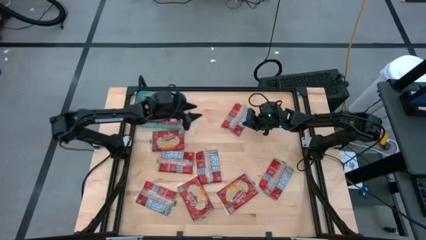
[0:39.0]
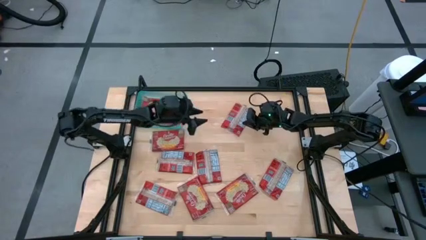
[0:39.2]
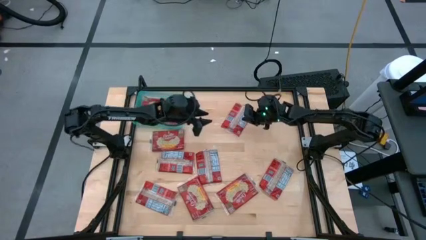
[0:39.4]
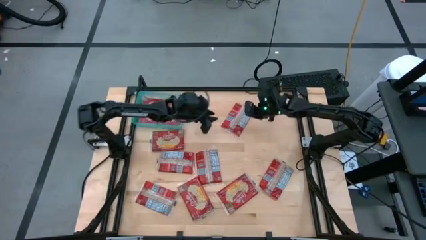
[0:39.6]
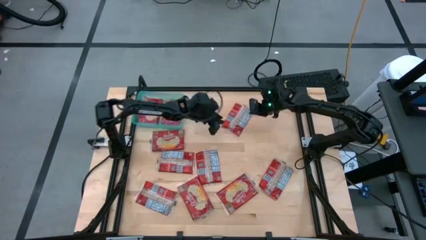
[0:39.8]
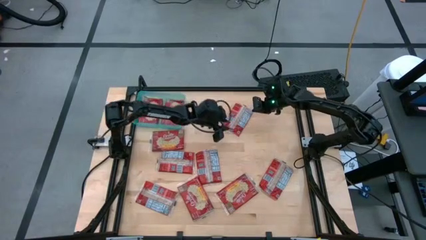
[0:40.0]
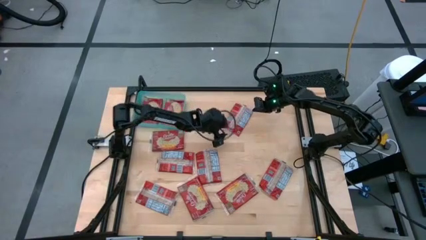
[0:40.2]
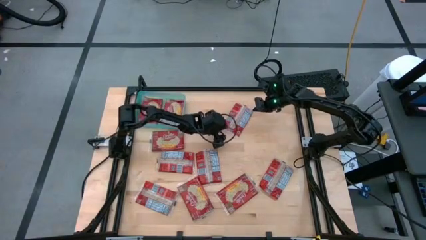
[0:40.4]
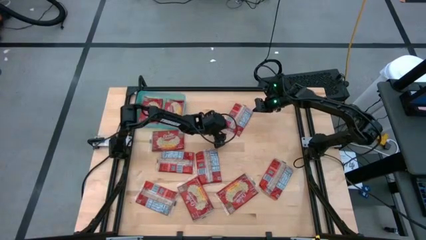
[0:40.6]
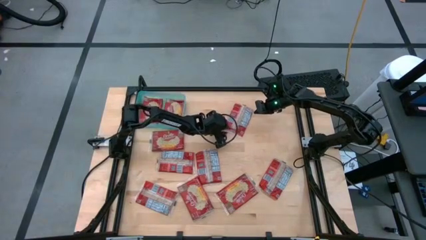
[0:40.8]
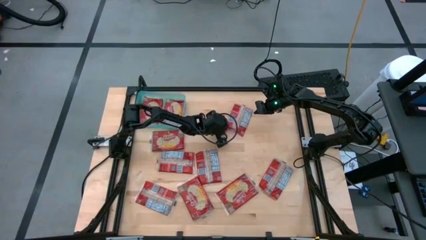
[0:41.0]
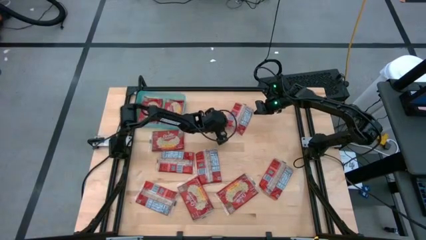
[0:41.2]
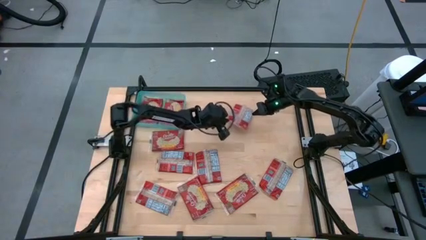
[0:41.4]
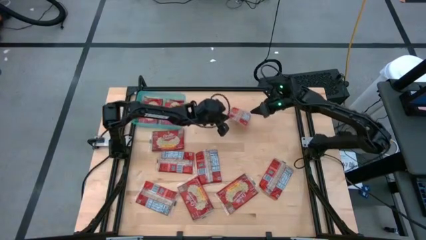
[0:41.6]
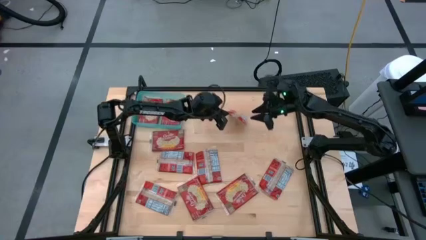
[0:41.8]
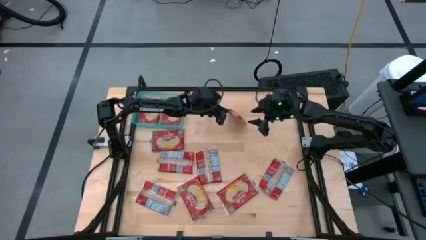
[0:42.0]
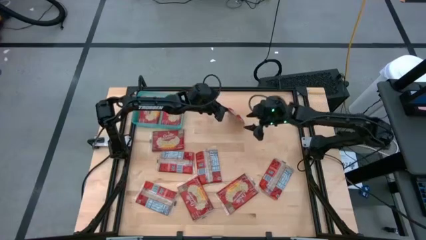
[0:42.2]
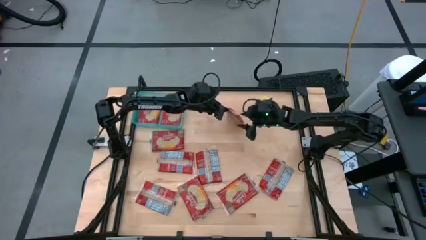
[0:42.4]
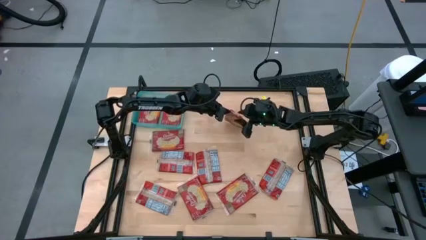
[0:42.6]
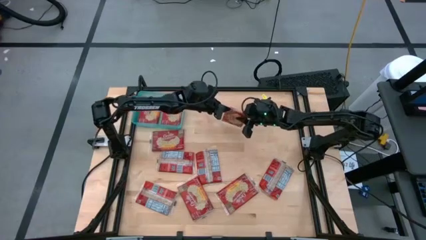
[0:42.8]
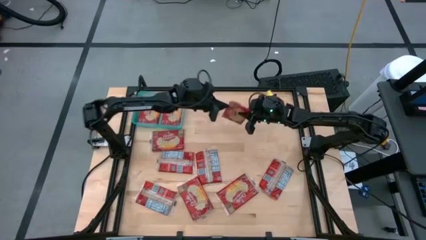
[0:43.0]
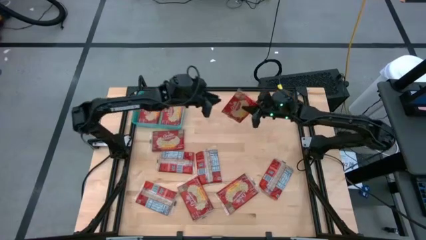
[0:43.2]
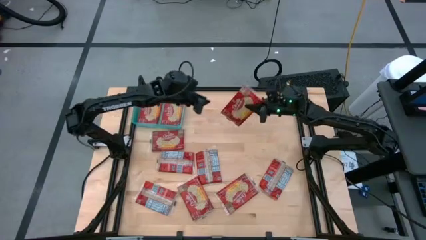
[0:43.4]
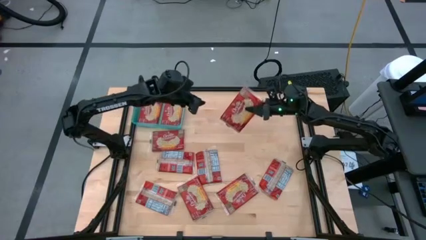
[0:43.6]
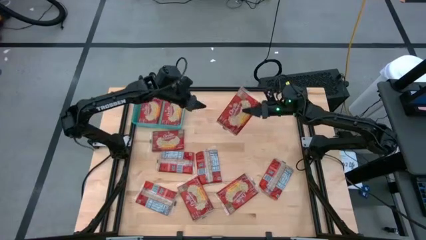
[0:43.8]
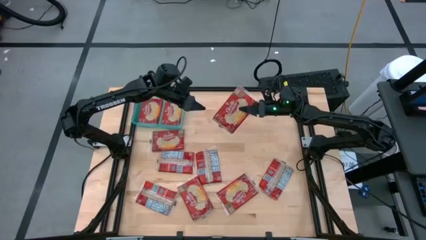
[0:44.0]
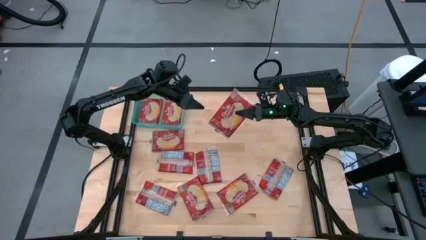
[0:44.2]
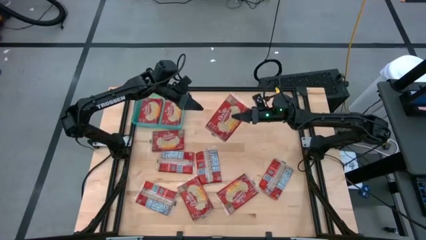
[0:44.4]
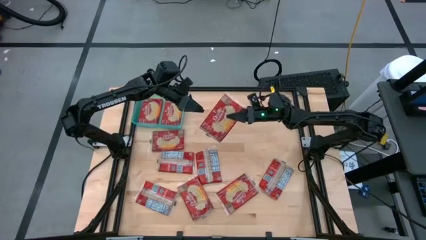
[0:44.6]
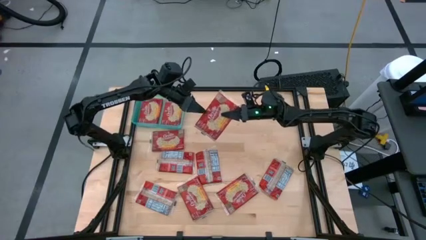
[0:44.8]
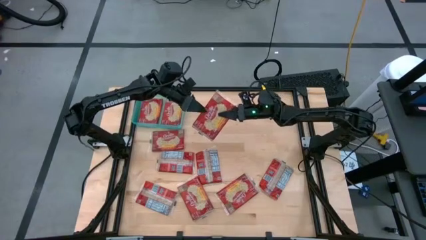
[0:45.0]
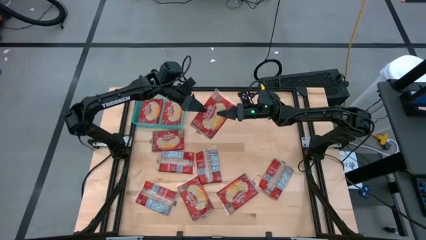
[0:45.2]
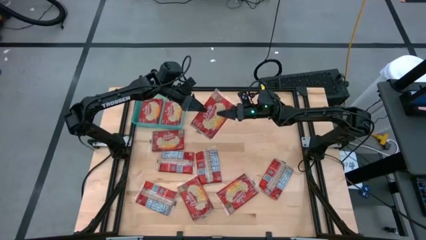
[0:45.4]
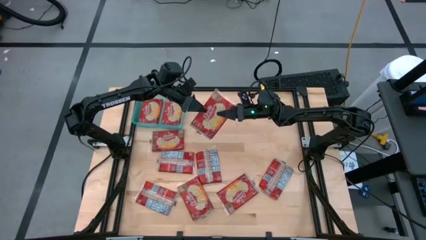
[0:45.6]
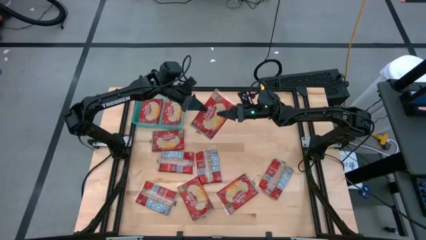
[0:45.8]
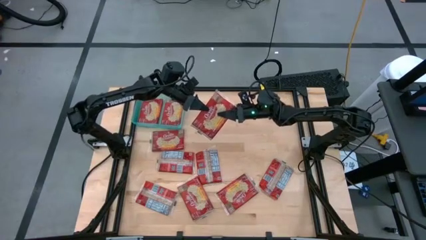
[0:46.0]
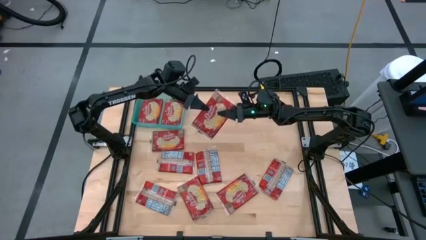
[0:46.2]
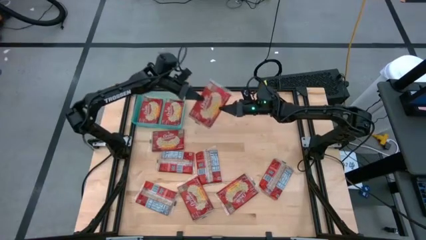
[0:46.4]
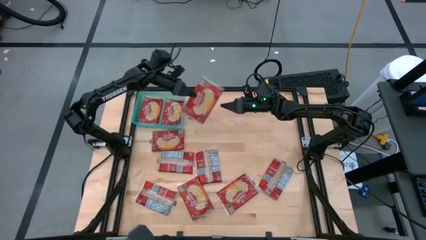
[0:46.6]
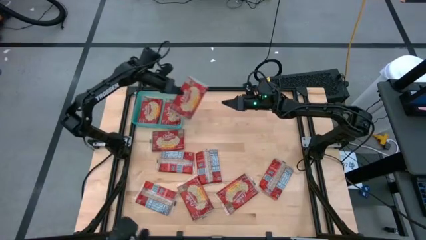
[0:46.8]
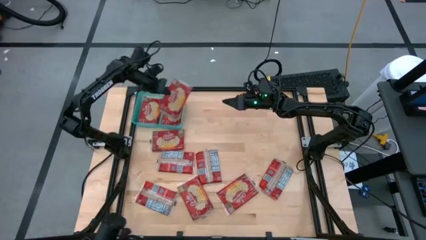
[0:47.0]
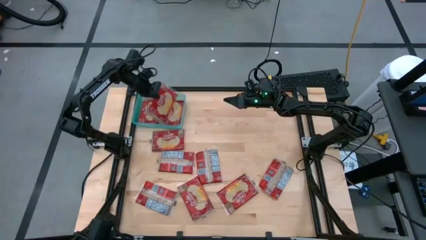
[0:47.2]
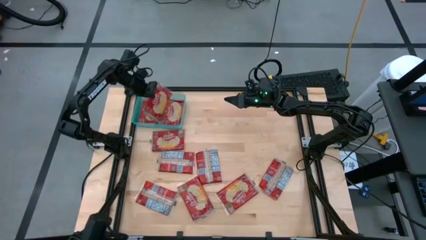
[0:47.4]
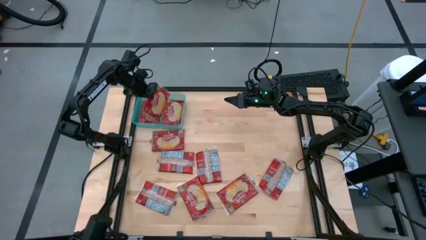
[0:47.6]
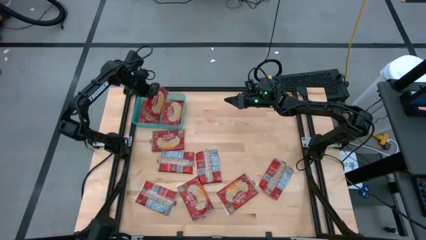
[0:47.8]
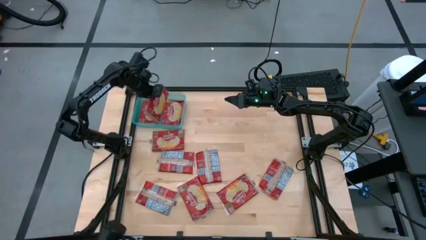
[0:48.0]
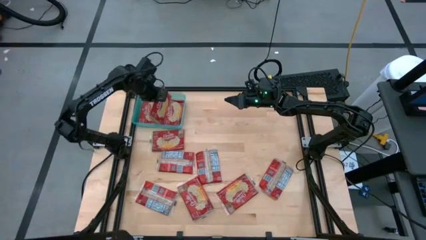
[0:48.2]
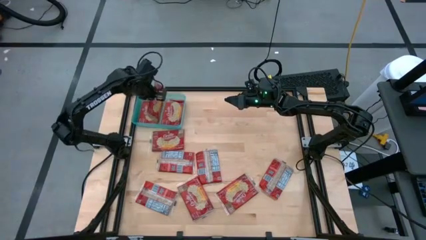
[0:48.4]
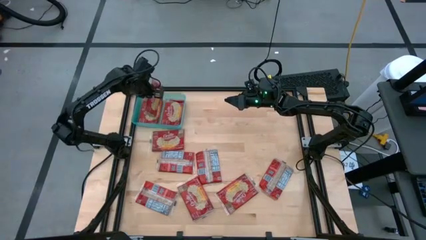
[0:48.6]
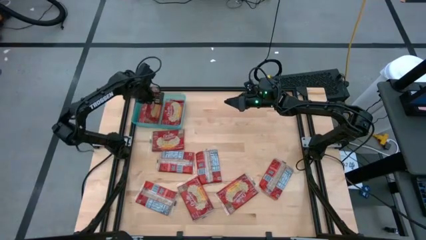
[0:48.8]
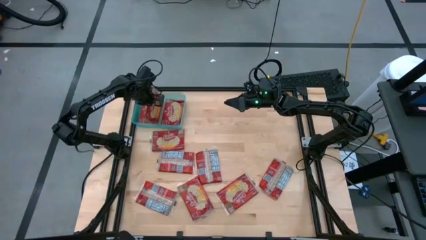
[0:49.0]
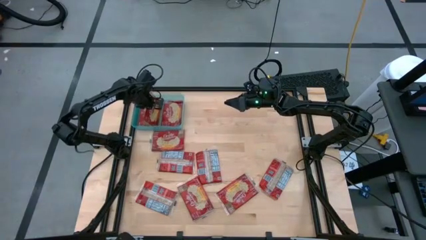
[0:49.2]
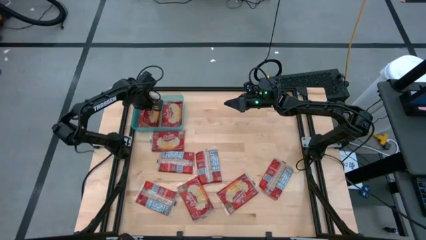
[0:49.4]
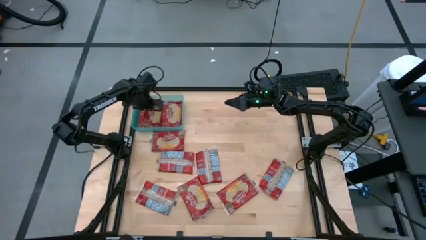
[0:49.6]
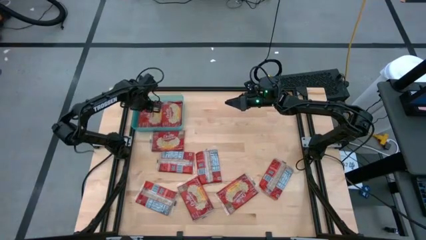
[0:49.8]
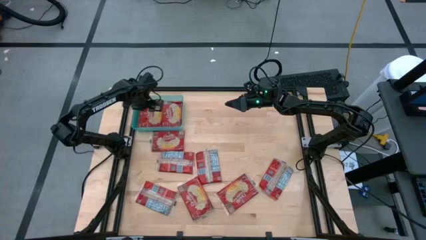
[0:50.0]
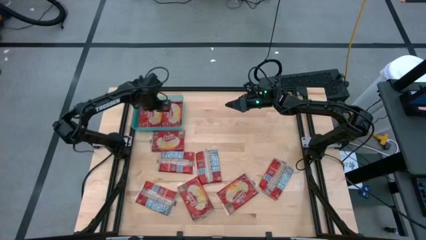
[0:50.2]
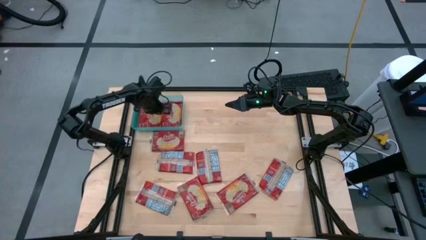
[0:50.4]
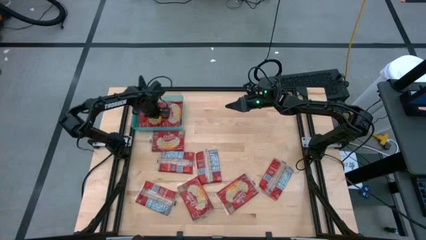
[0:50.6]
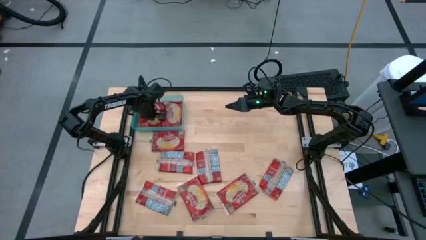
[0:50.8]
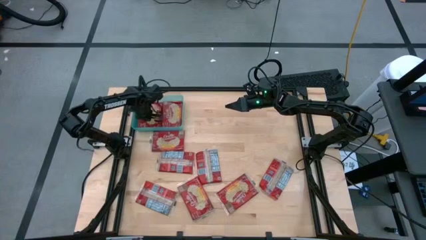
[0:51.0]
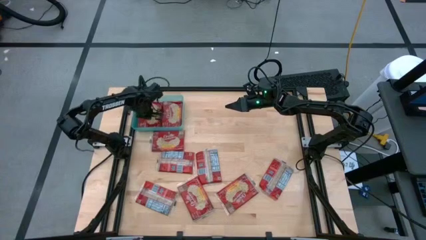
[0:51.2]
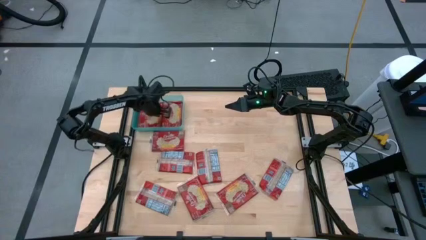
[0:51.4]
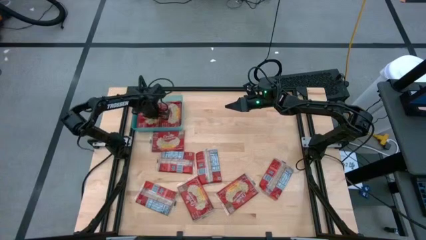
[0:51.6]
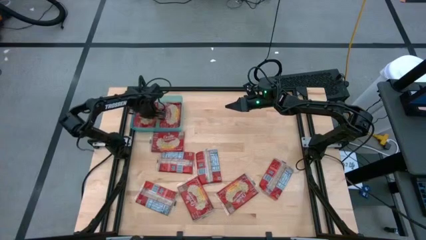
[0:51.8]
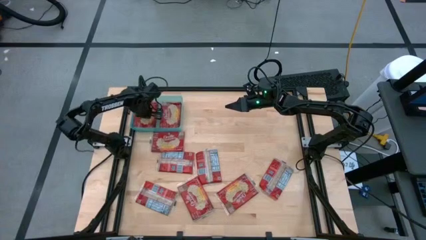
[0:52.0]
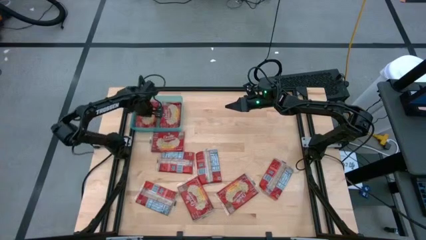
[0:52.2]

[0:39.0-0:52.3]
Task: Sort popcorn bags into baskets
Put the red popcorn bag into the blue bin

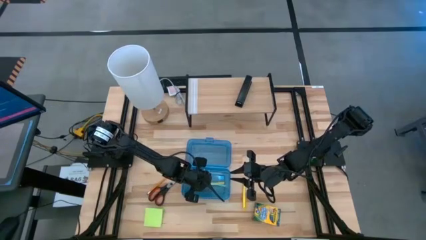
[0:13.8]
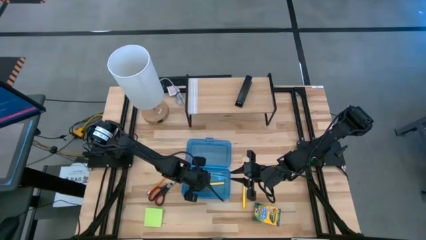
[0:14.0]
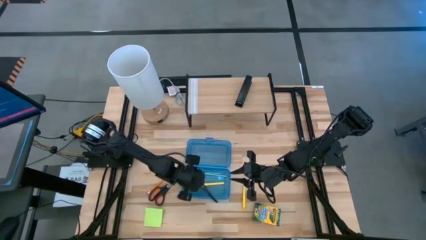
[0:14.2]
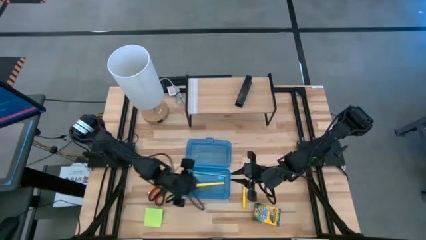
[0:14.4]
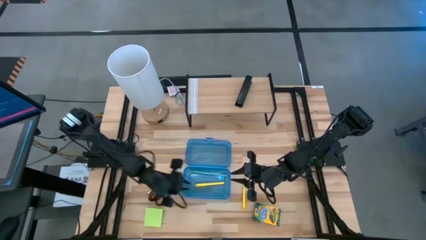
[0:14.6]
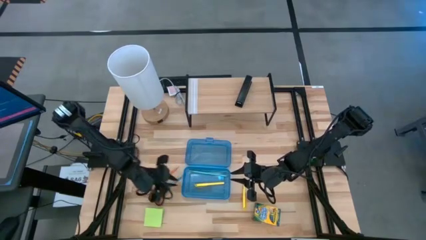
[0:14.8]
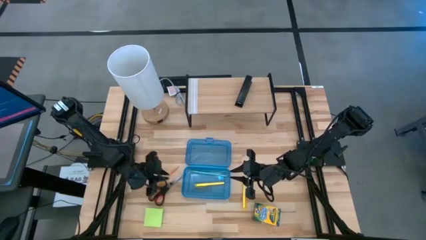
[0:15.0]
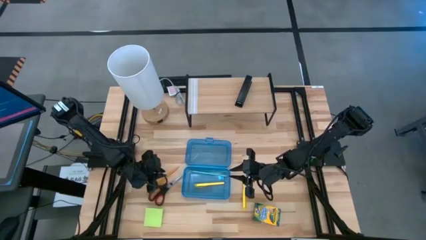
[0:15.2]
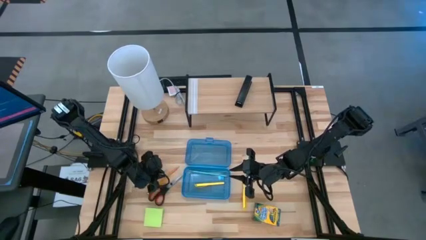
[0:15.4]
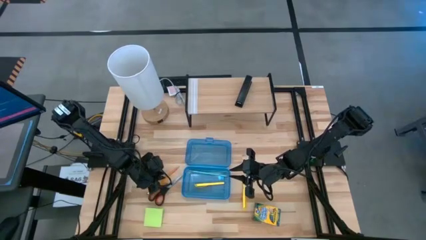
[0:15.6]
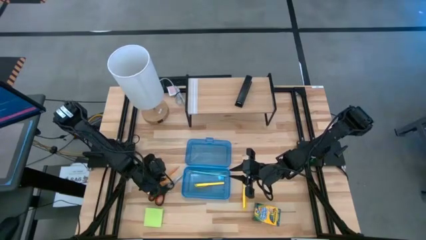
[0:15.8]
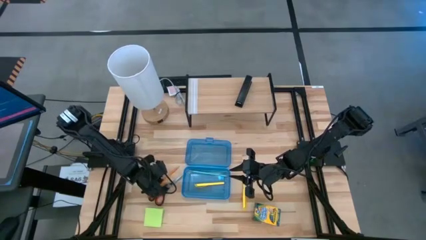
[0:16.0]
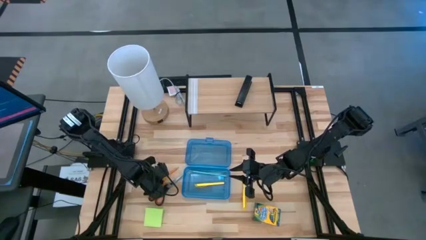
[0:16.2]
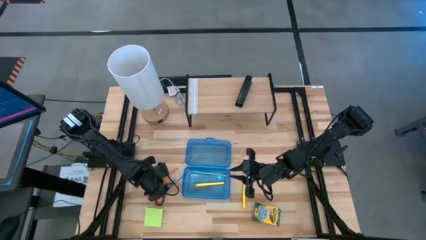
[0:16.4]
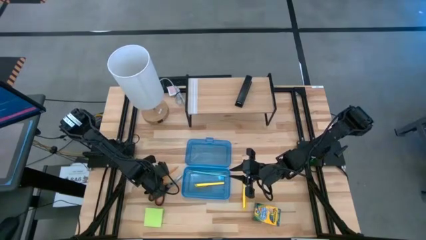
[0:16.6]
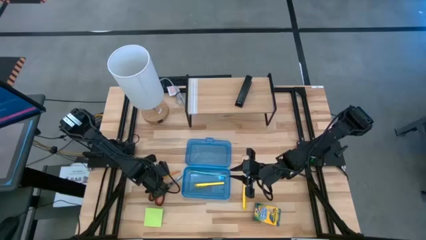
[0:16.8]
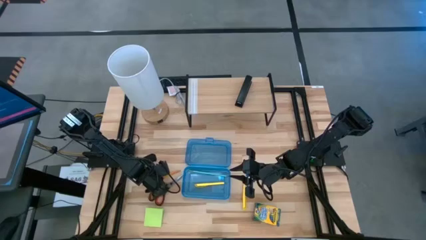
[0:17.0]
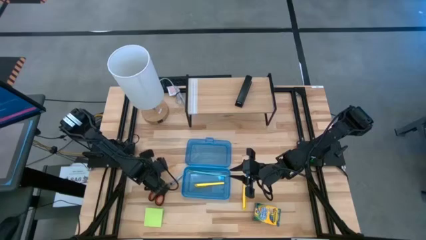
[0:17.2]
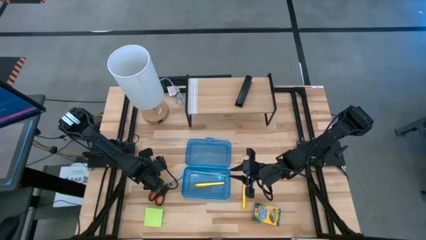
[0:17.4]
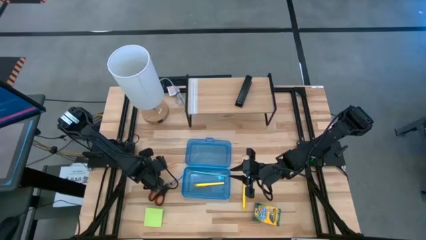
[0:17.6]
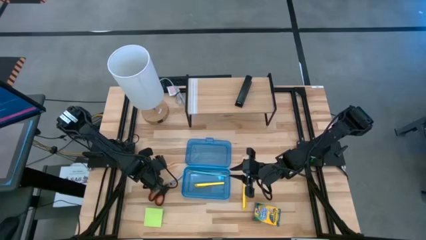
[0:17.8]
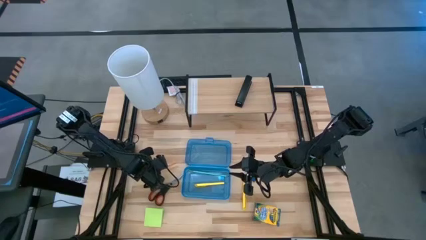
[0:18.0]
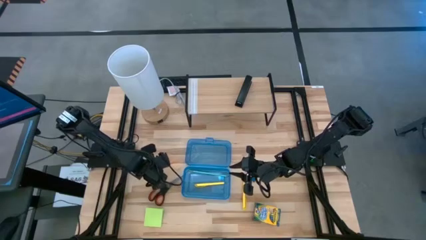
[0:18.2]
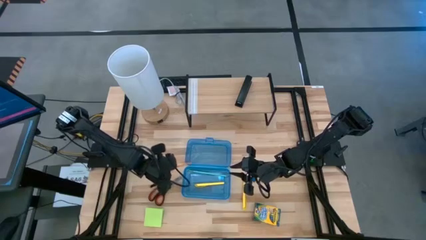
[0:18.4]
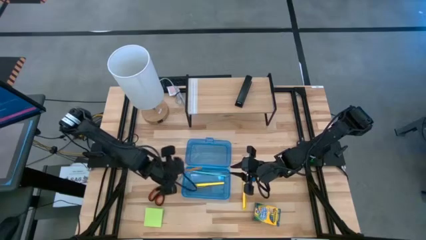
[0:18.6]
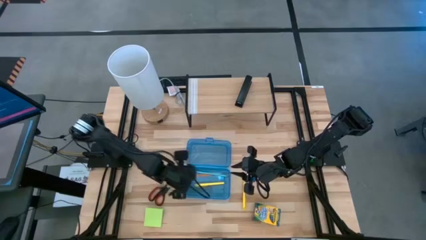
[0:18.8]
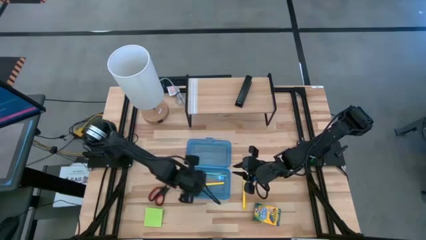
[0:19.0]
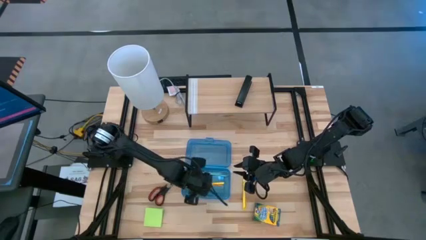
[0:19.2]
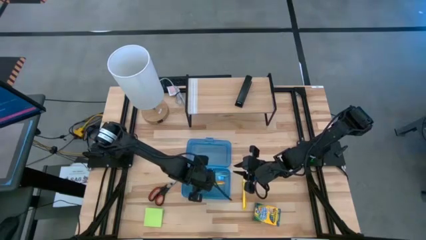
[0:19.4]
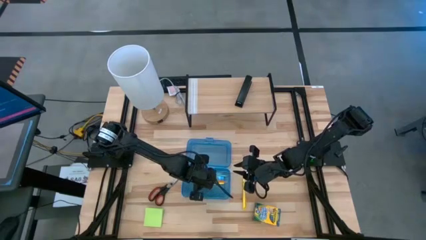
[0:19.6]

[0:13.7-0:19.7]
Task: Pack school essentials
Put the orange pencil into the supply box
